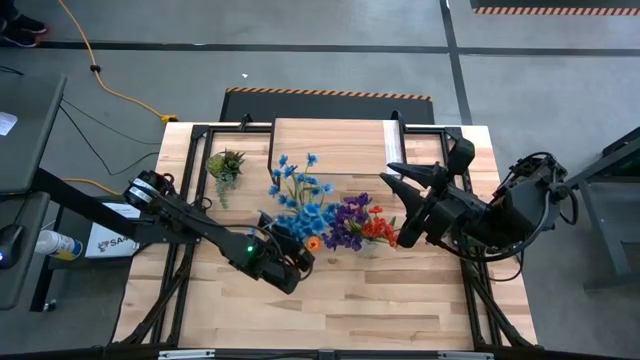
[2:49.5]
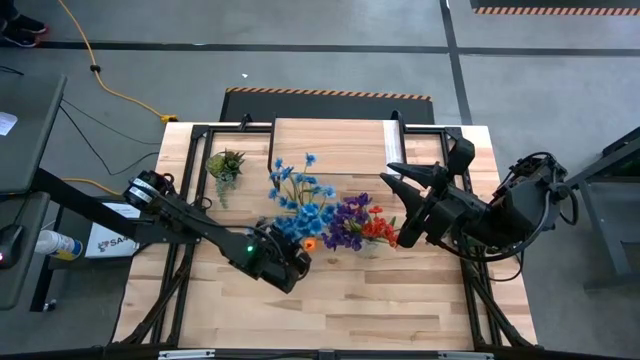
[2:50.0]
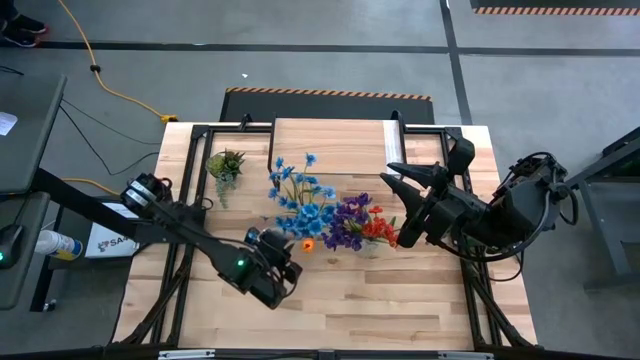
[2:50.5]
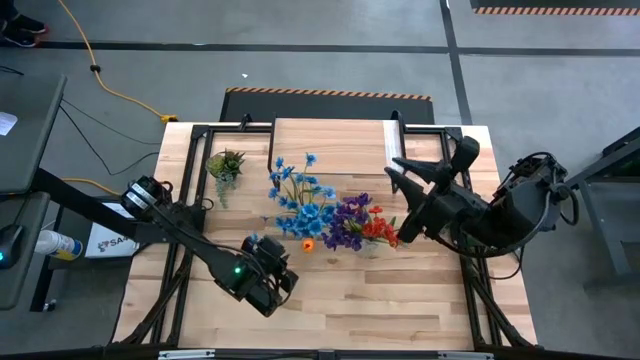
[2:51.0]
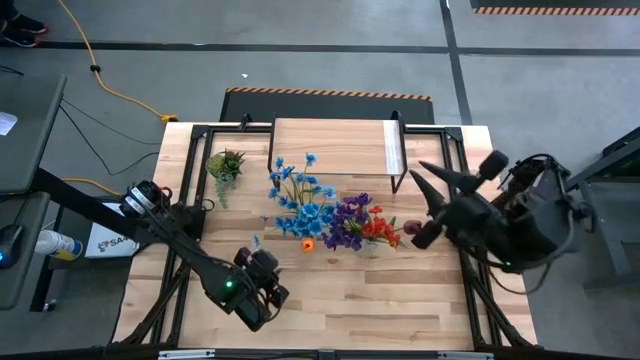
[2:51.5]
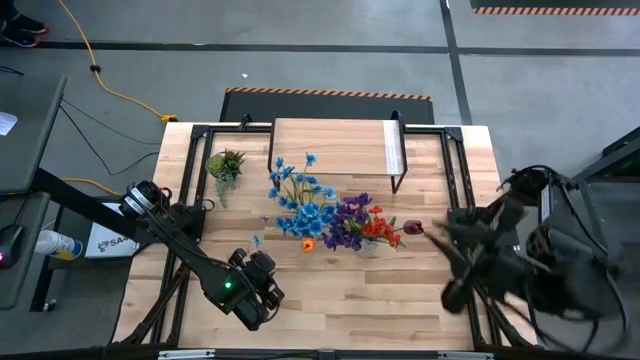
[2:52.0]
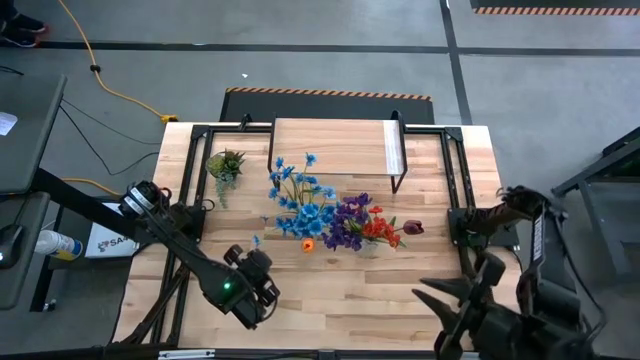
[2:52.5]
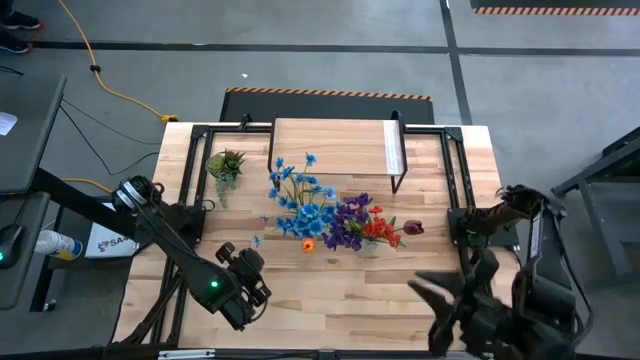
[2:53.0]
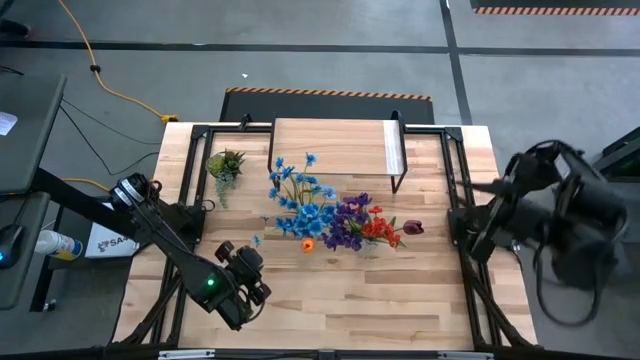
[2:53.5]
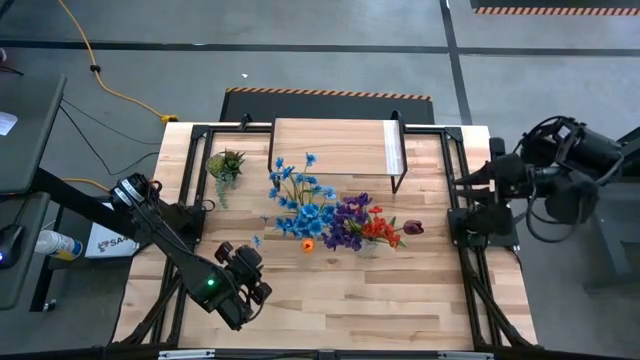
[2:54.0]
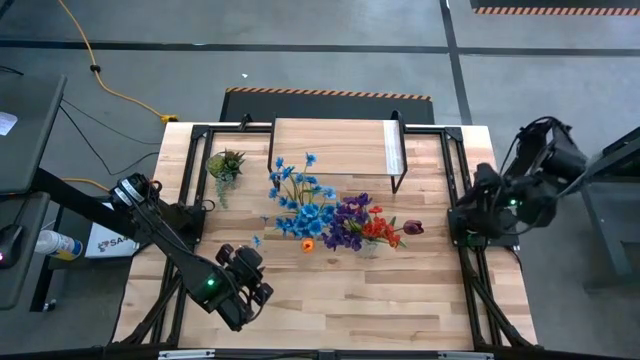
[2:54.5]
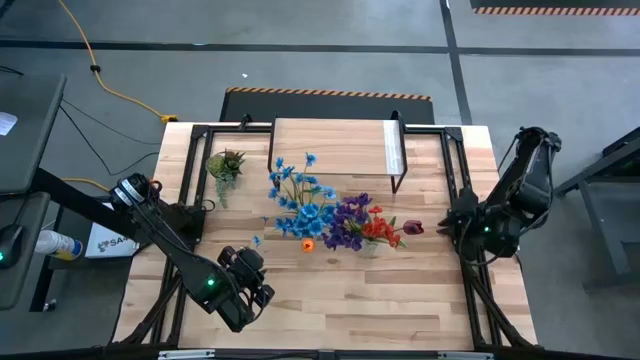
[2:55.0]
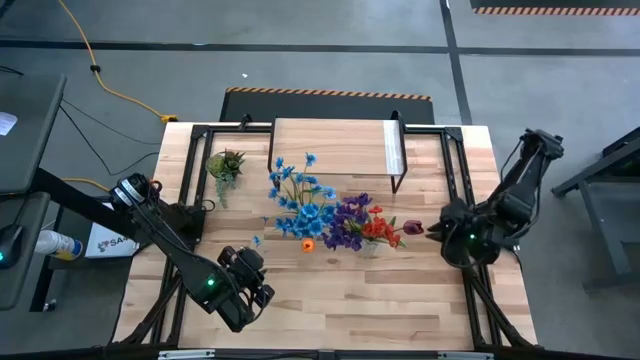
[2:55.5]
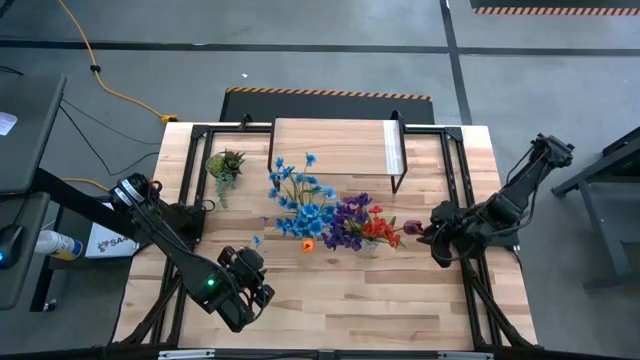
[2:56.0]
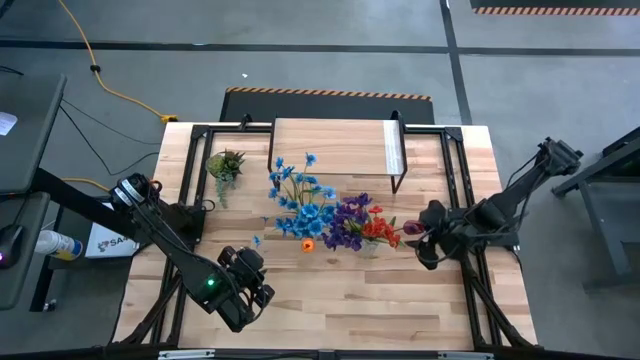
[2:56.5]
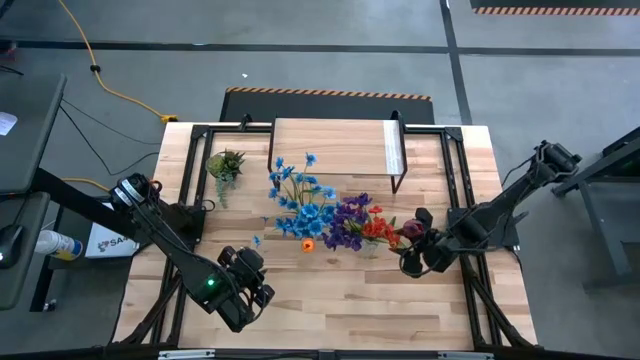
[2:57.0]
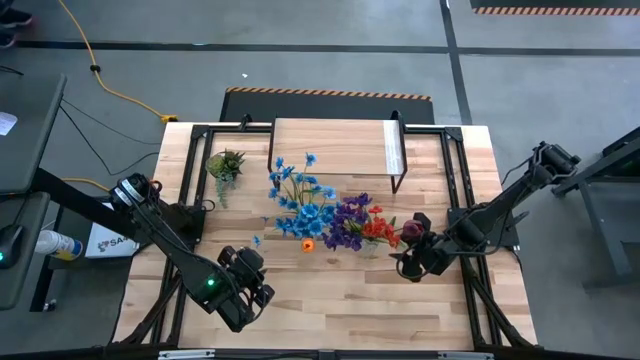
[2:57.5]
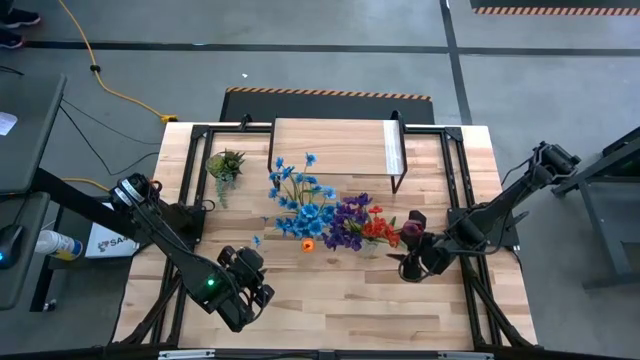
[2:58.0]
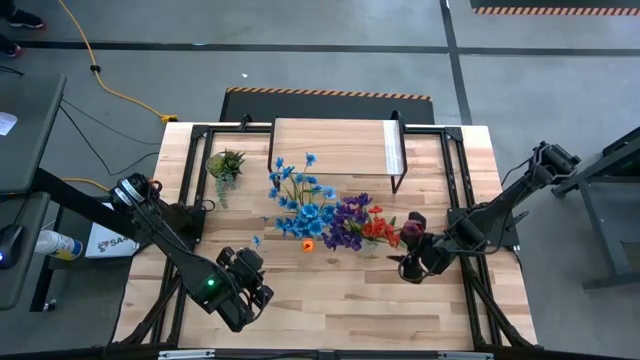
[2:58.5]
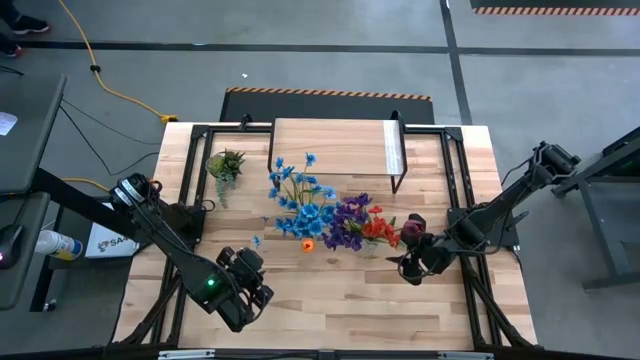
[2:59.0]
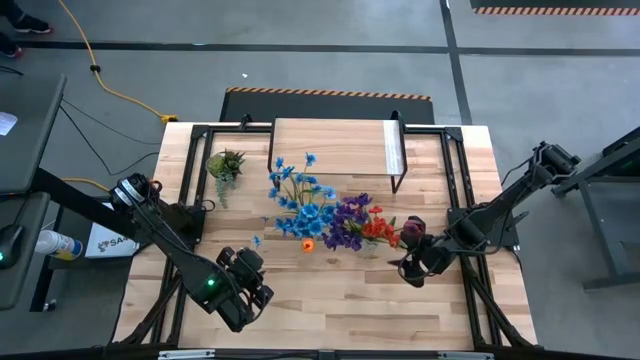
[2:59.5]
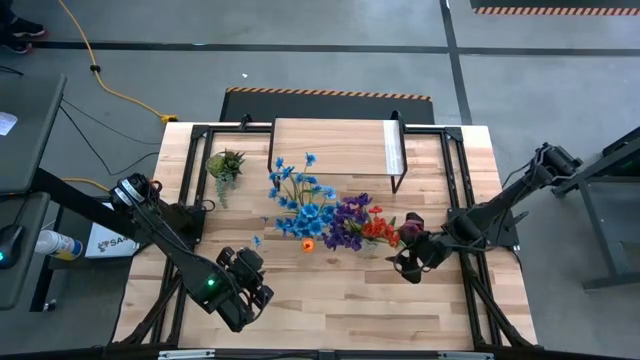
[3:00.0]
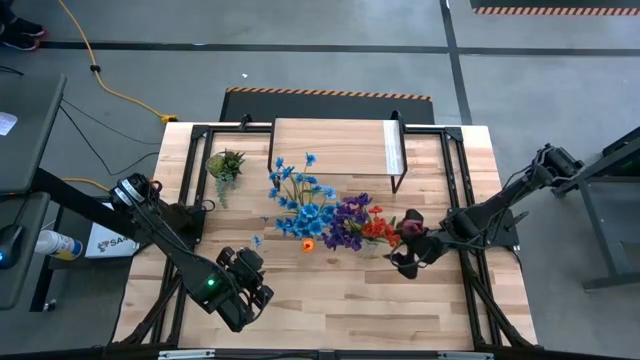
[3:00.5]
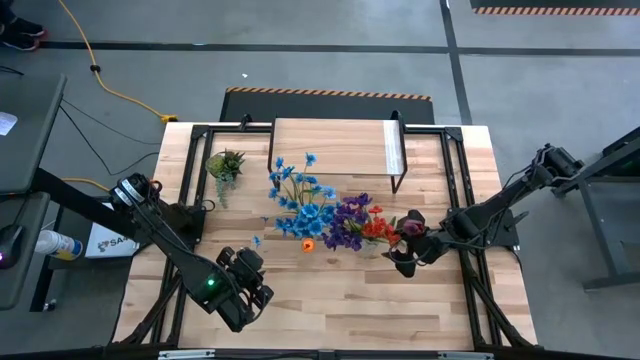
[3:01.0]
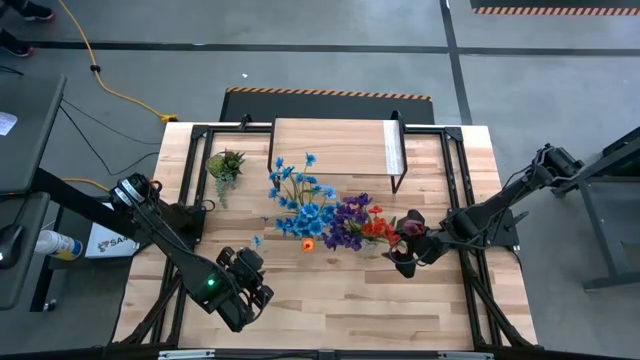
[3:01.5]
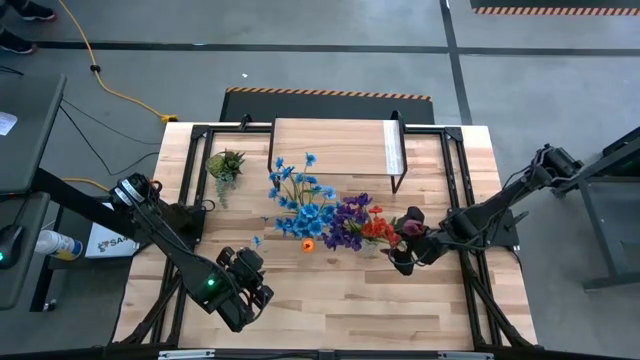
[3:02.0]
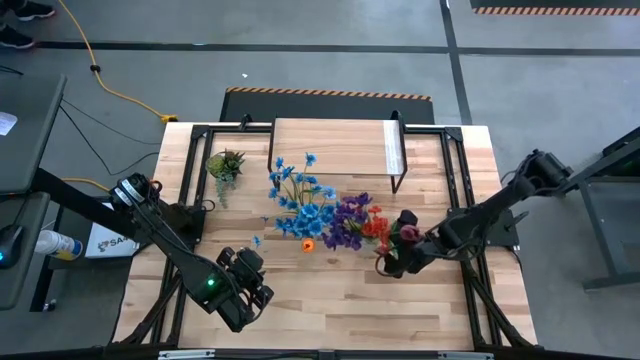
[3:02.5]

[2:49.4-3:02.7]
Task: Pick and place flowers into a vace then onto a shelf
Put the right transparent flower vase on the shelf

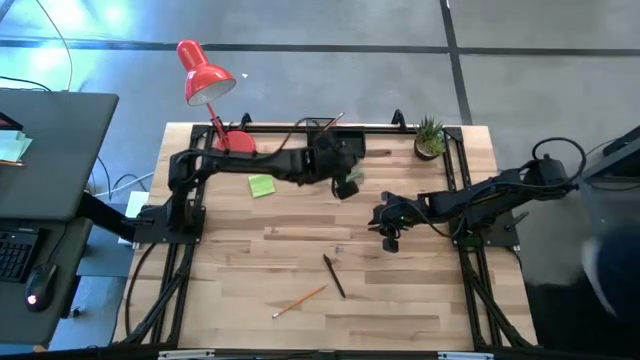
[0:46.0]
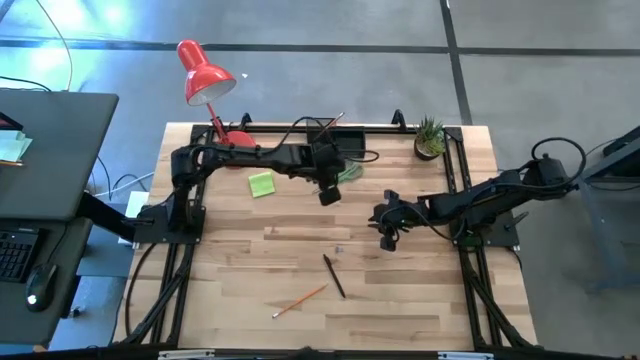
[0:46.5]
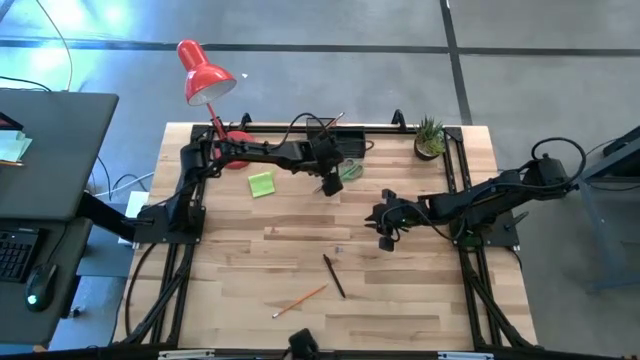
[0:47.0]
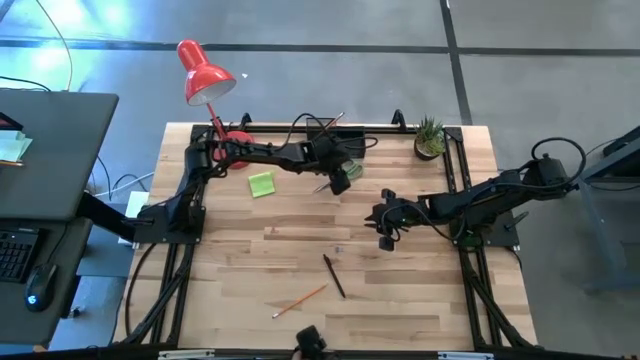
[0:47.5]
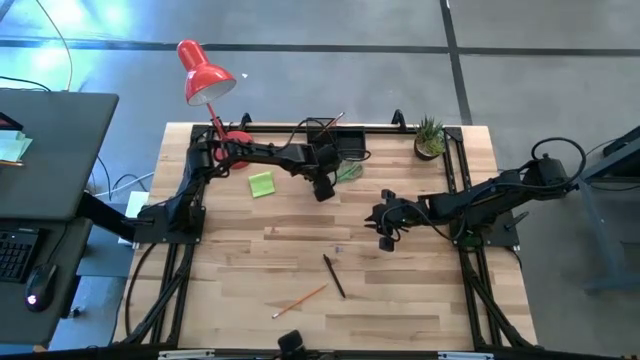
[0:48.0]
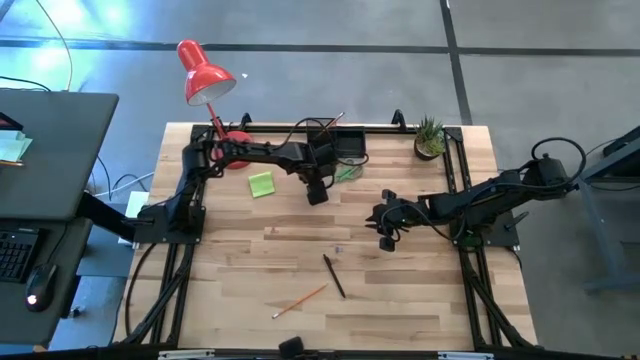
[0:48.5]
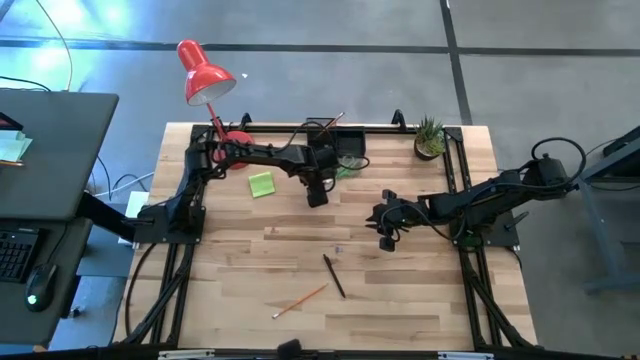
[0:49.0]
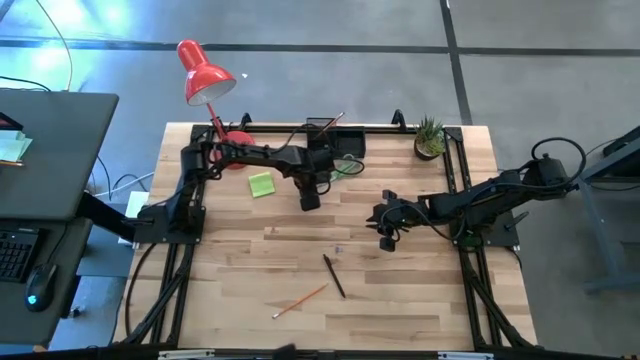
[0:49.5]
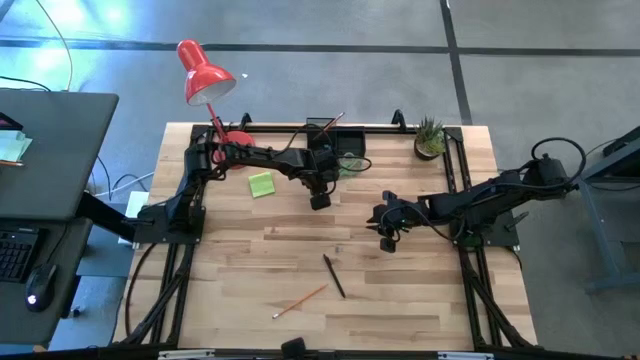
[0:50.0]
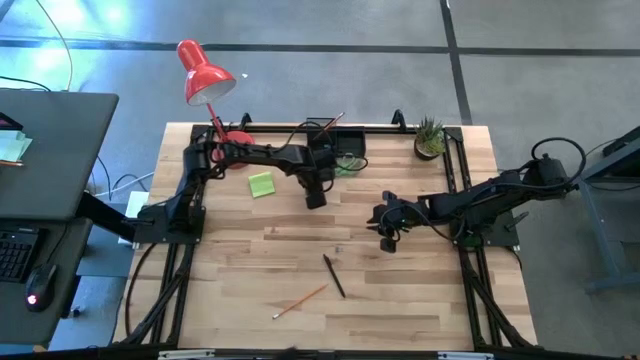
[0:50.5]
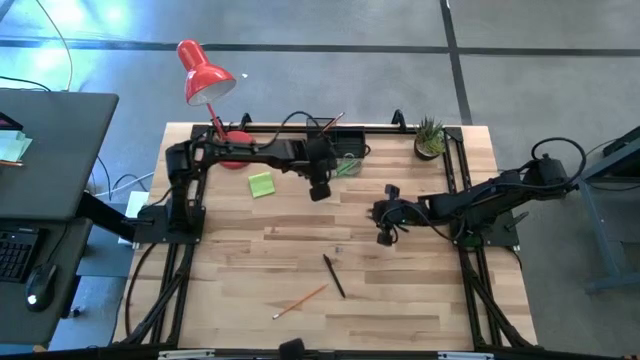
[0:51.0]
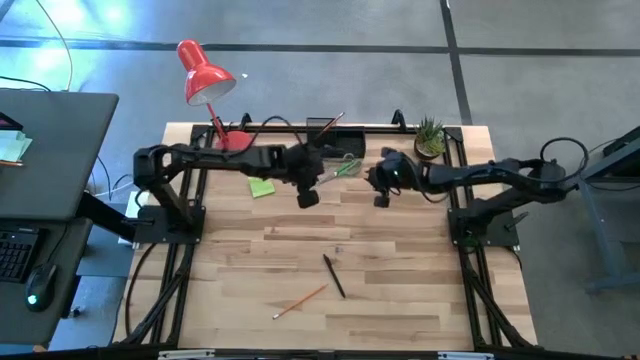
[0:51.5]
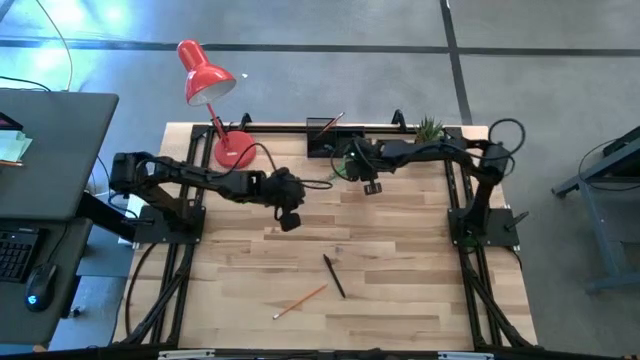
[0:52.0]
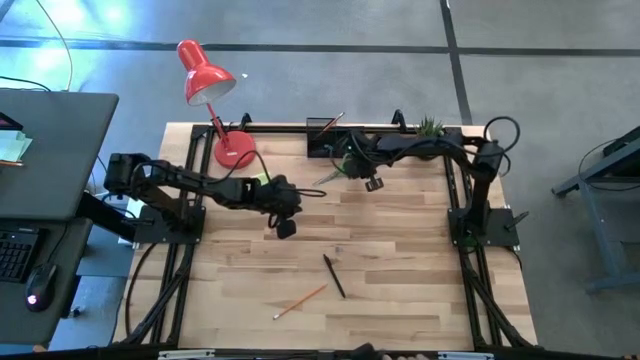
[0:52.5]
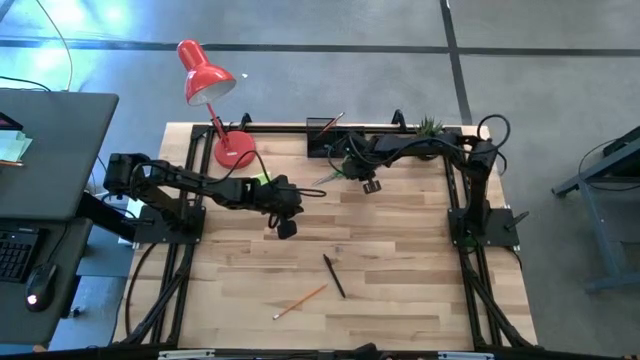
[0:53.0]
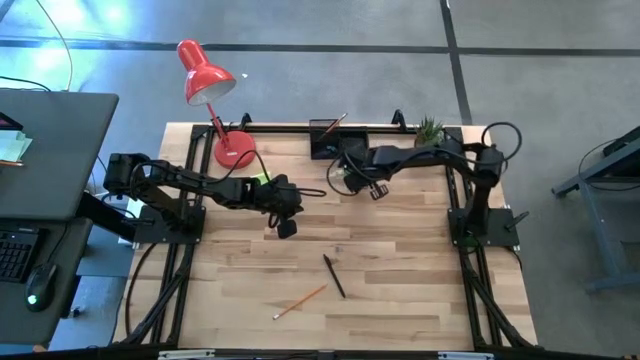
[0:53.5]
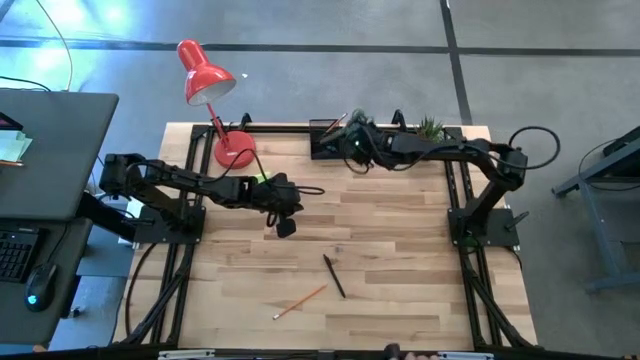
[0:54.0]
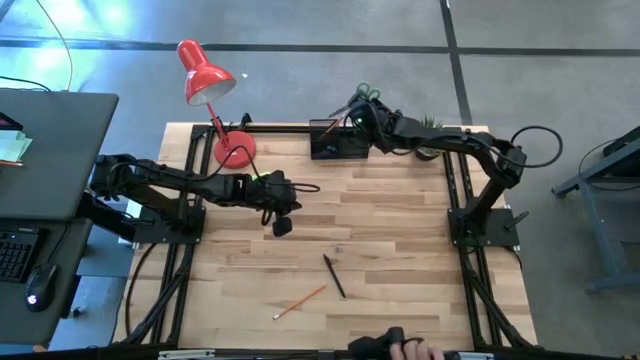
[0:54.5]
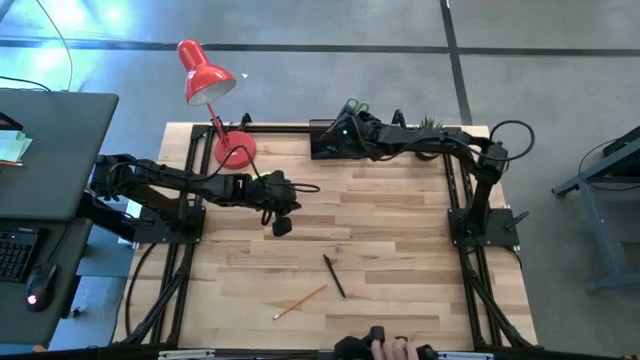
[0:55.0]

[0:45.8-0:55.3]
Task: Pick and place office supplies into organizer
Put the green scissor into the desk organizer
